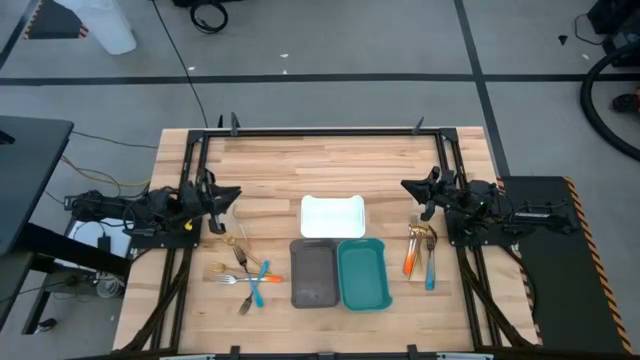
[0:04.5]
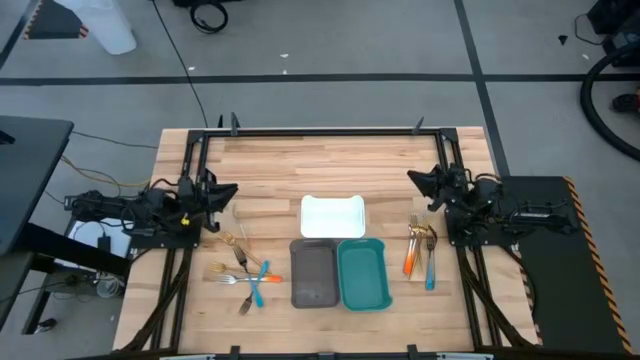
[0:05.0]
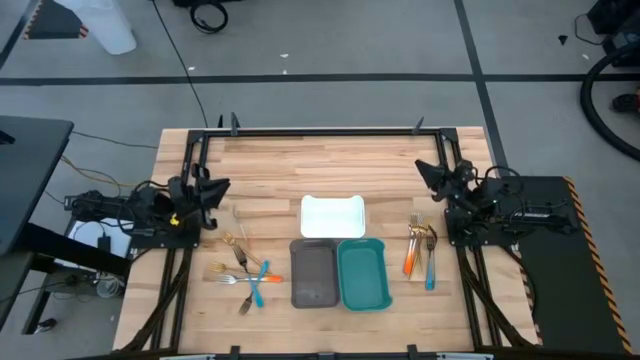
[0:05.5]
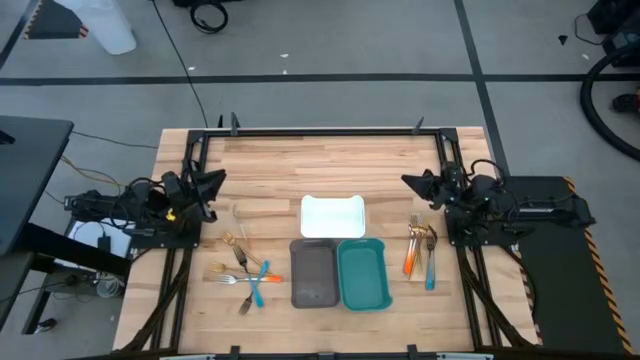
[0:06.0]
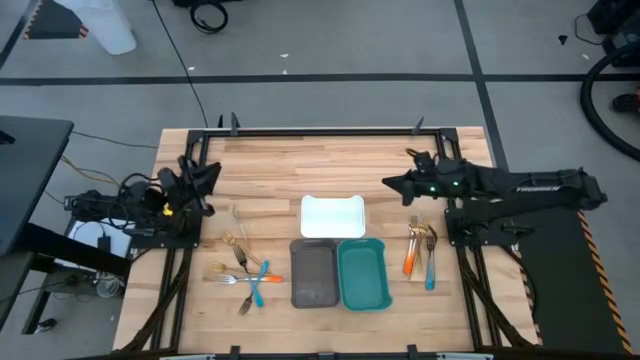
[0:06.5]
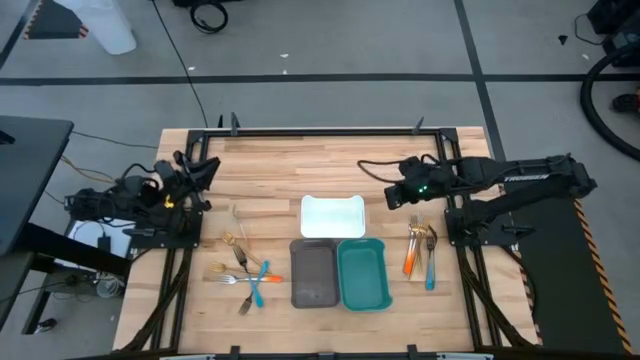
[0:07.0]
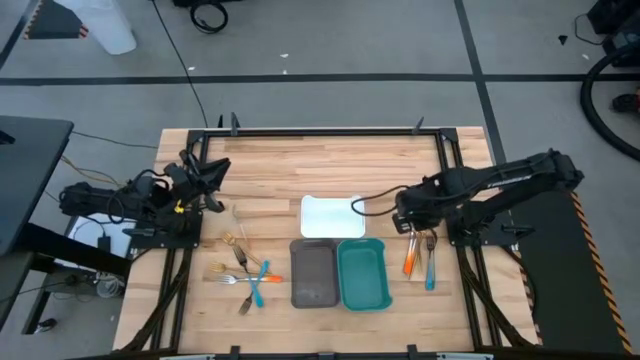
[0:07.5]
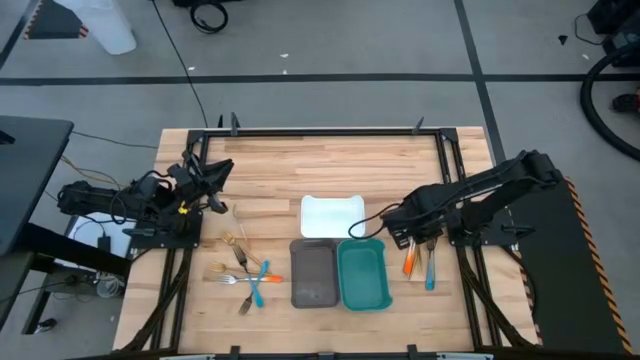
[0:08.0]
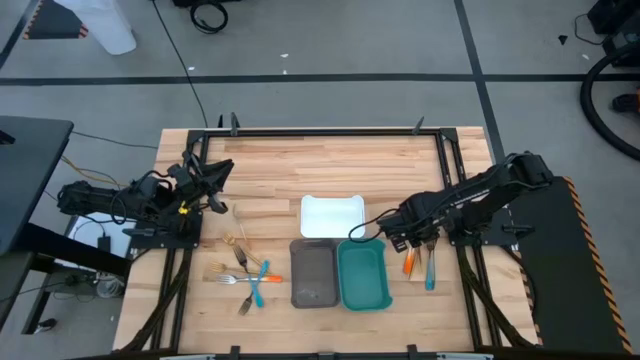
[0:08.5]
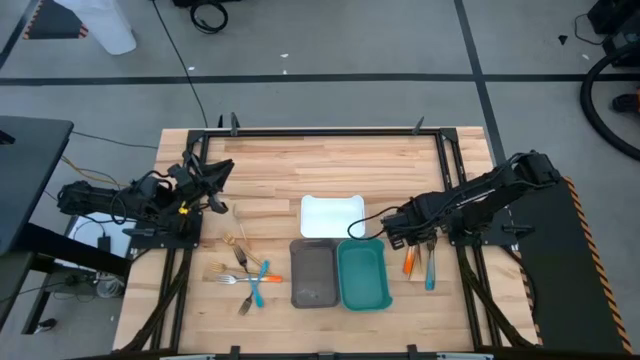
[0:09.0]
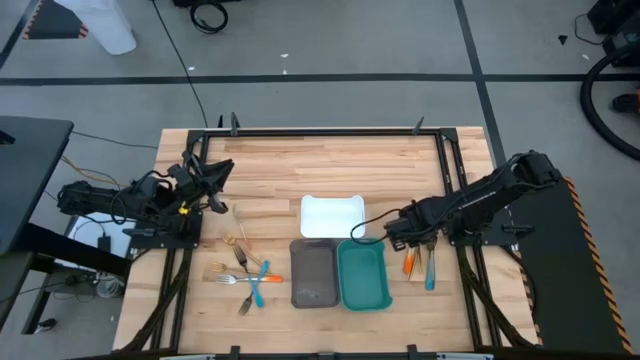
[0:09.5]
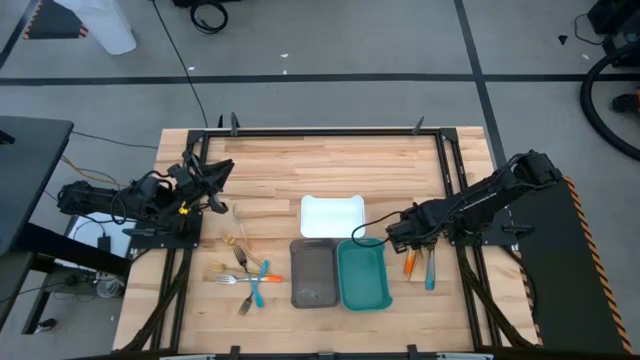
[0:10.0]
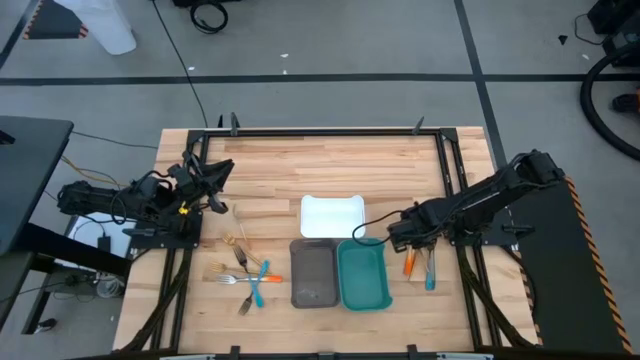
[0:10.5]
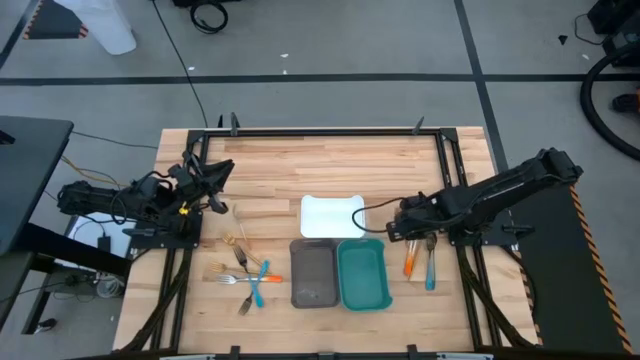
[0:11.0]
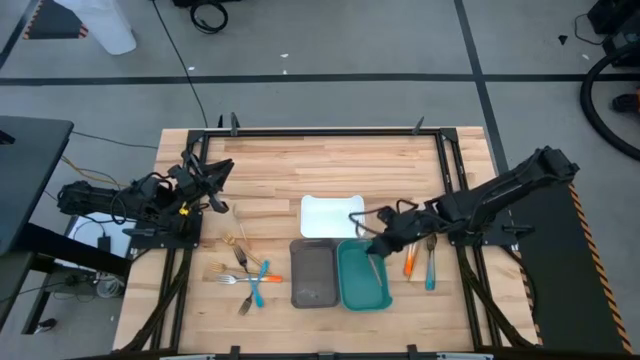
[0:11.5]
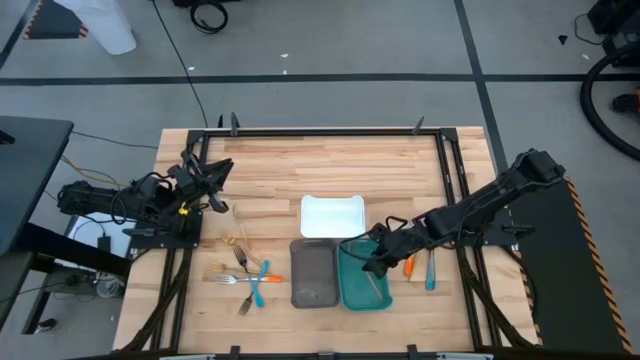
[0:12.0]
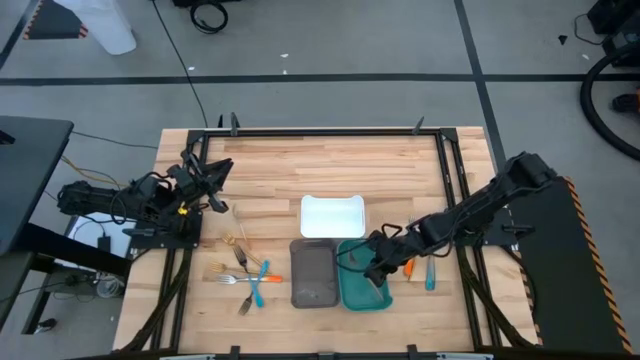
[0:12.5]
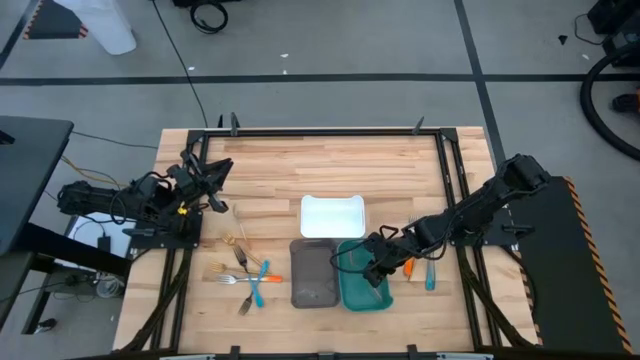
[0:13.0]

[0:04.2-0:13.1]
Task: Sort silverware by color (type)
Put the gold fork into the green bin

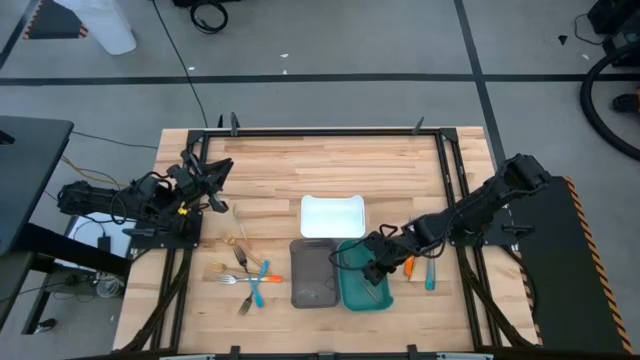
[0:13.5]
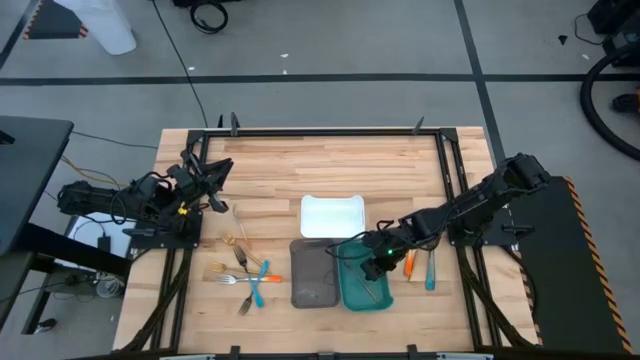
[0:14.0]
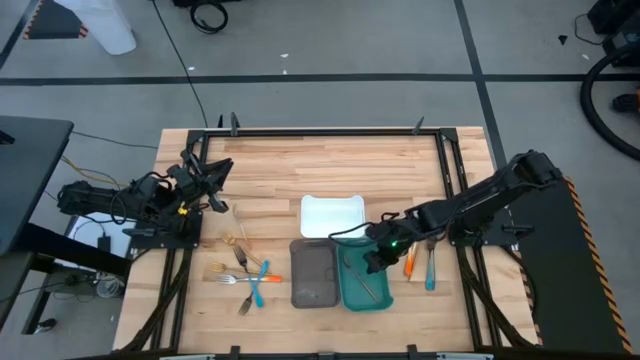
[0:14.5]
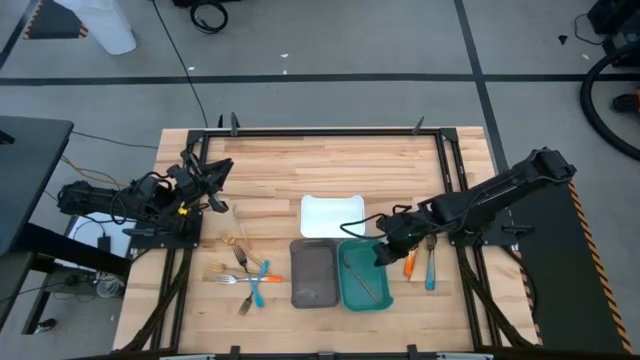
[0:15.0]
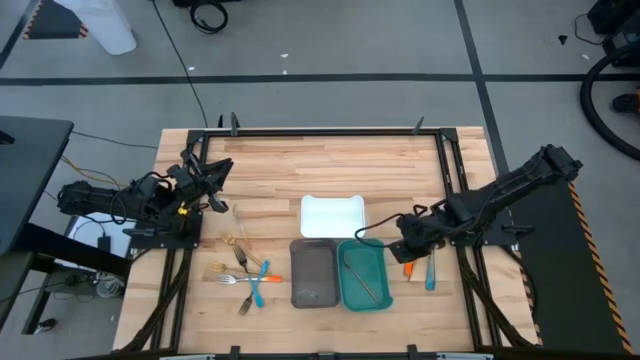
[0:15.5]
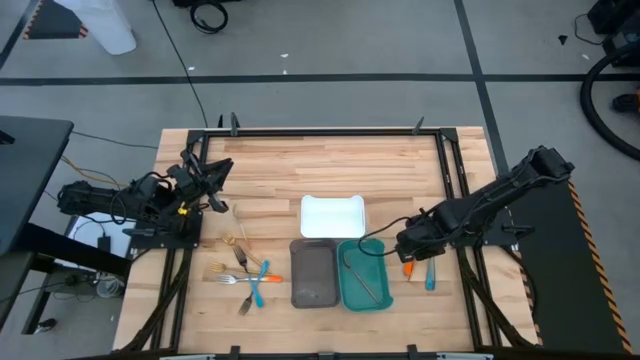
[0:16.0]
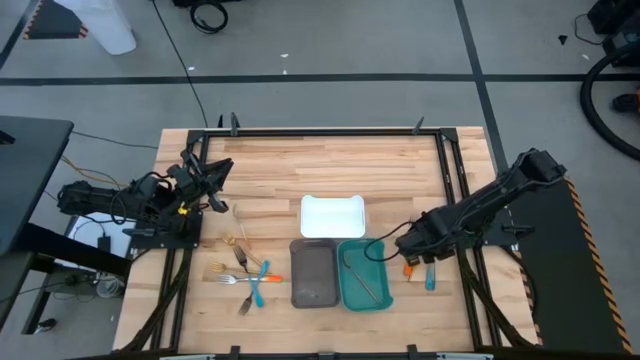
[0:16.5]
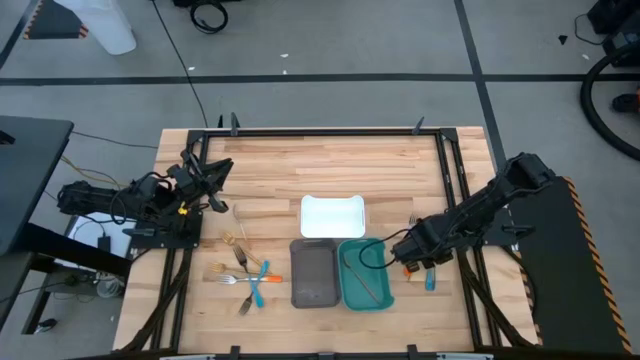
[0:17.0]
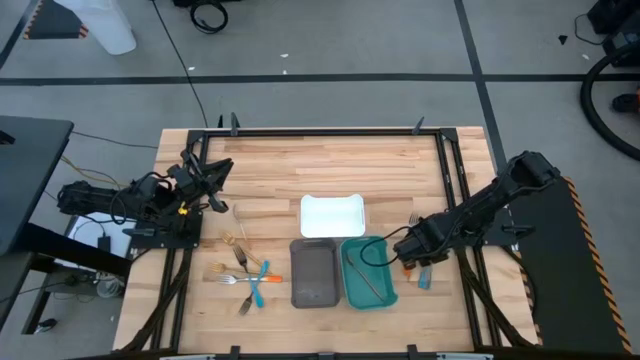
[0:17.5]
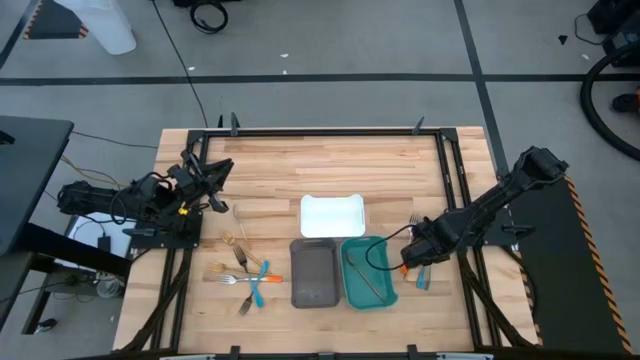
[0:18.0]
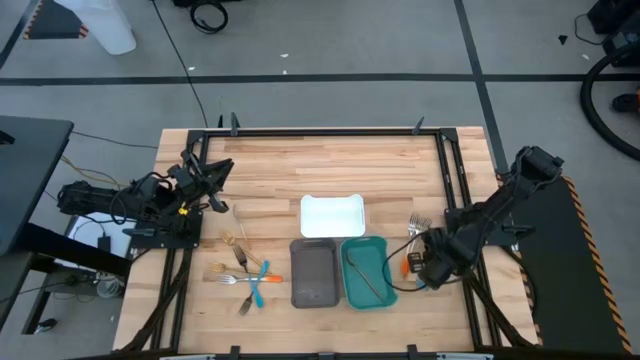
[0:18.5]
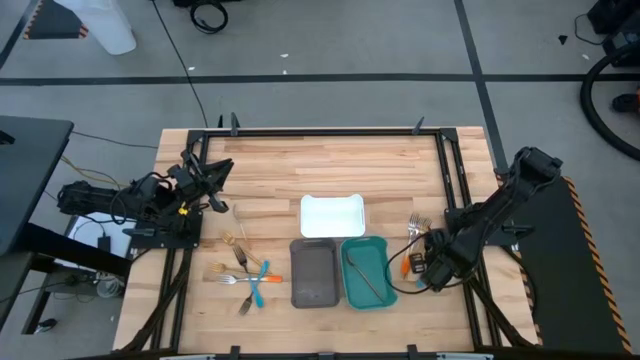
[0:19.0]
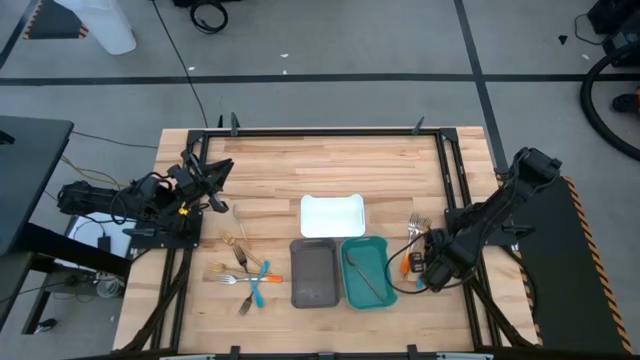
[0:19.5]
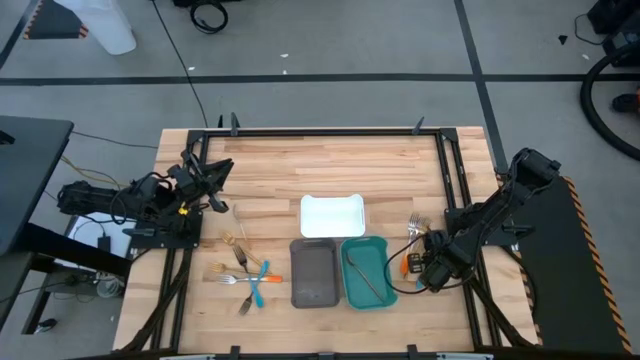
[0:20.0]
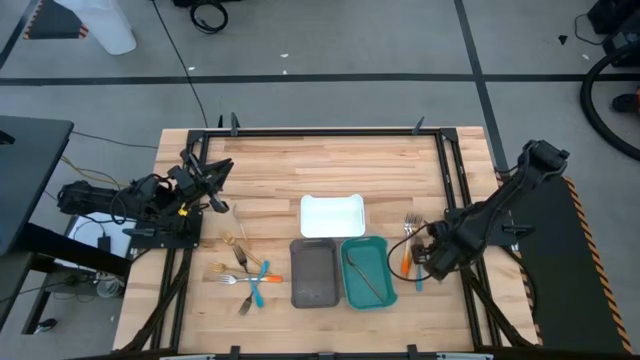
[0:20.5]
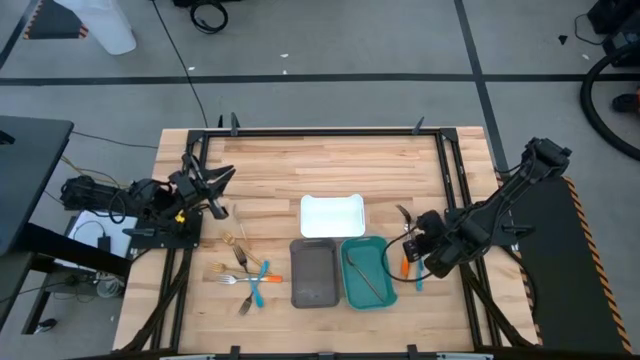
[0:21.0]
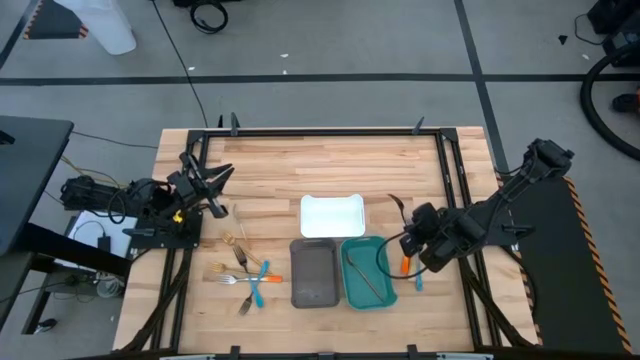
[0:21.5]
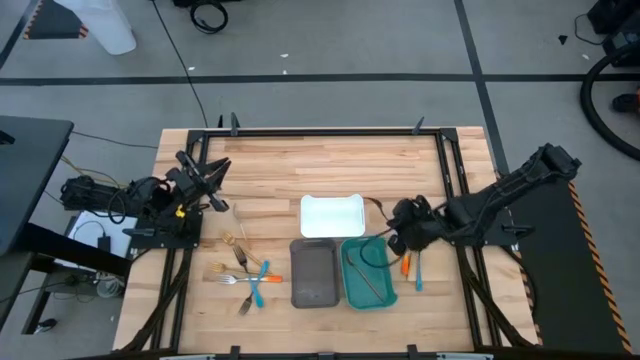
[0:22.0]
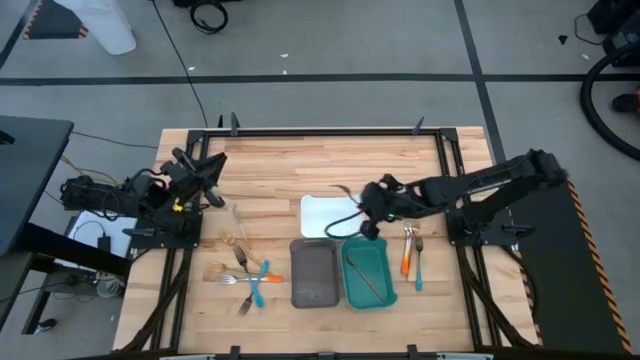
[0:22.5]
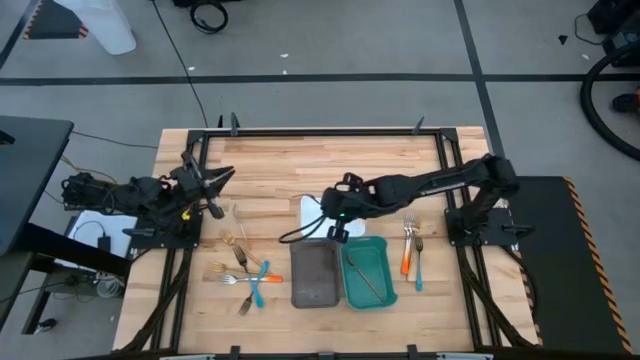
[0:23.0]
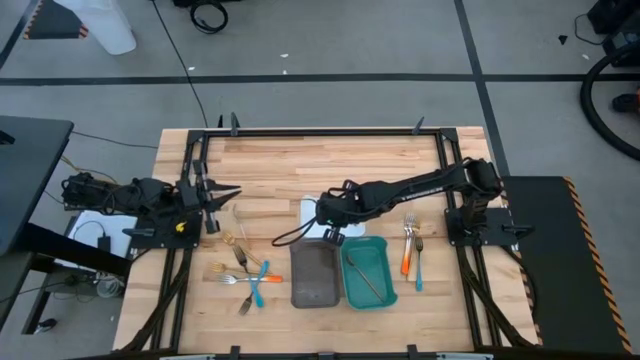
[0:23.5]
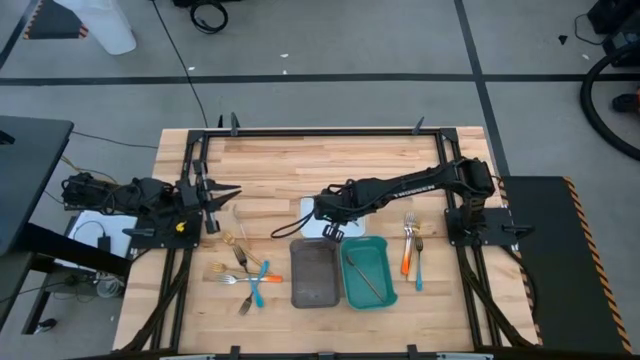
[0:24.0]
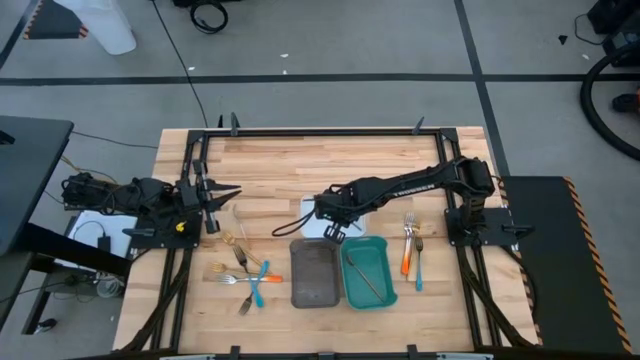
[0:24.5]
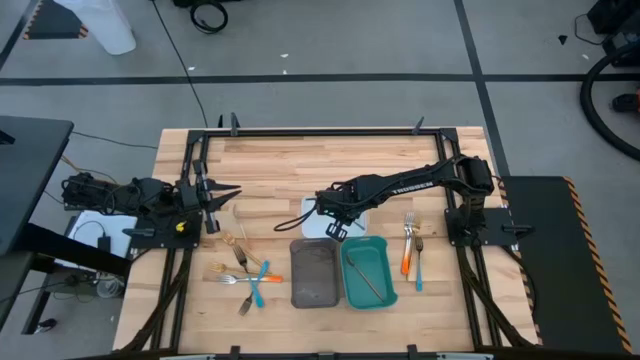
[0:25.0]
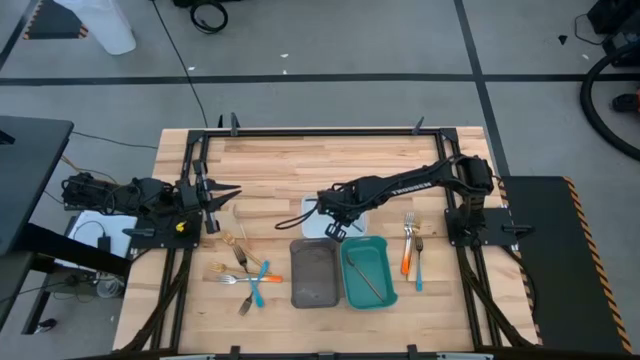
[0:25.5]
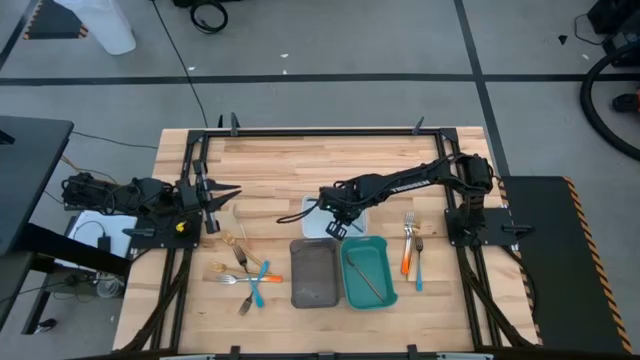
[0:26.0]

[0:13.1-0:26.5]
Put the blue fork into the white bin
